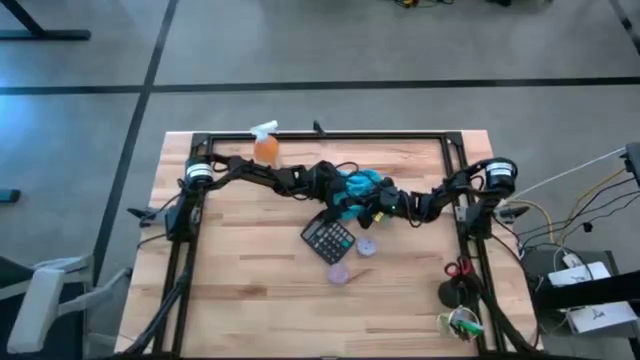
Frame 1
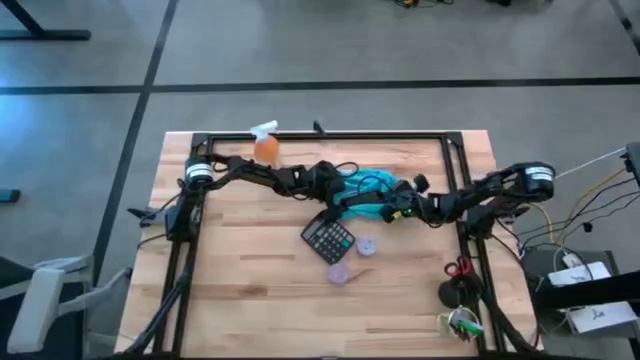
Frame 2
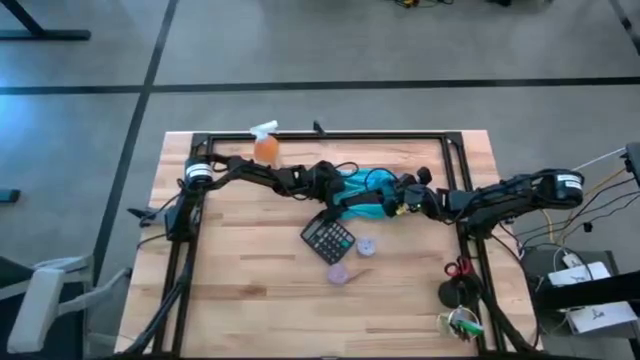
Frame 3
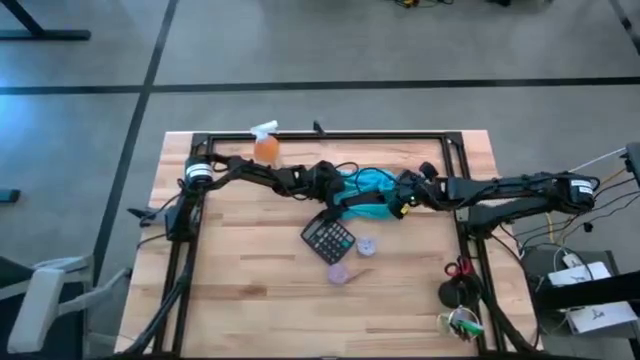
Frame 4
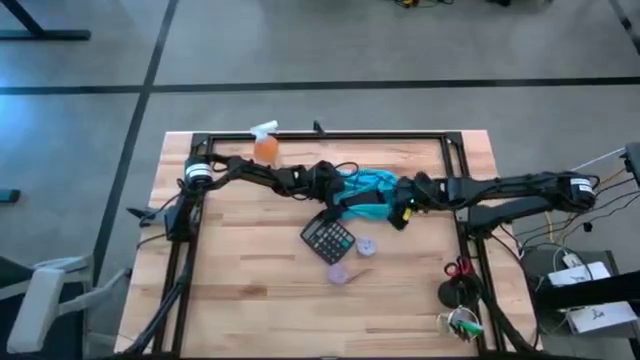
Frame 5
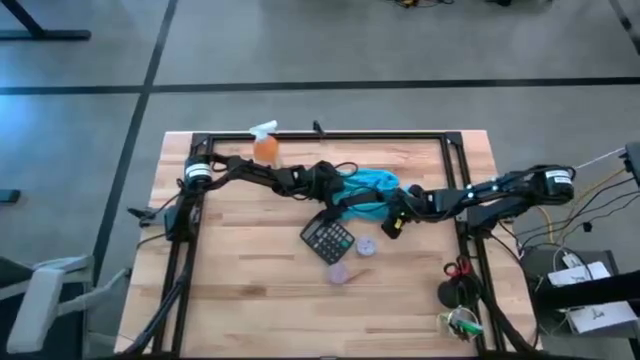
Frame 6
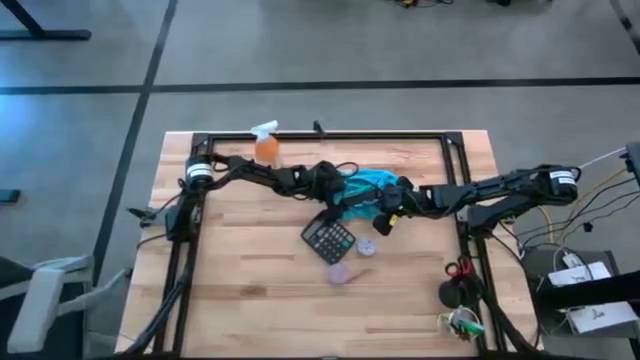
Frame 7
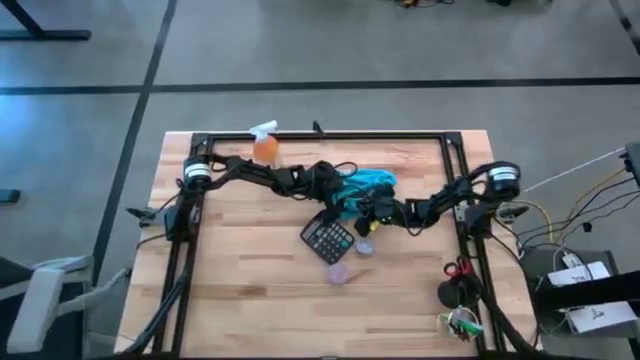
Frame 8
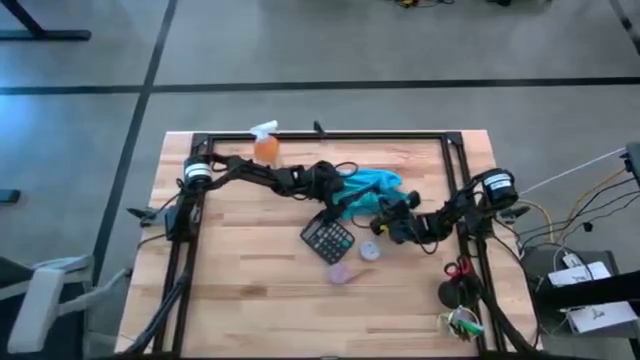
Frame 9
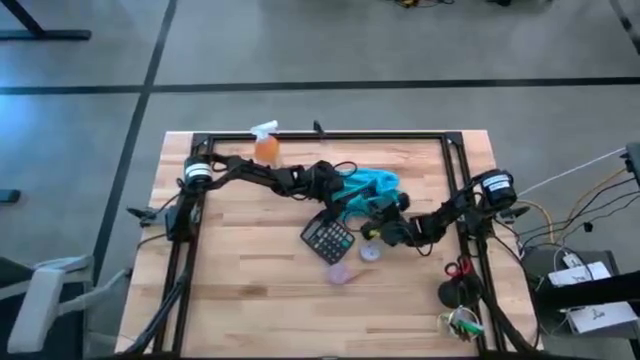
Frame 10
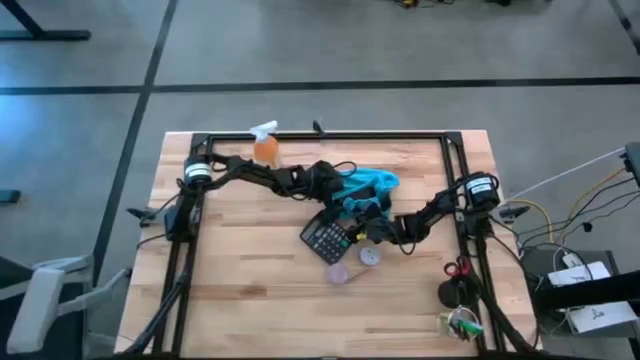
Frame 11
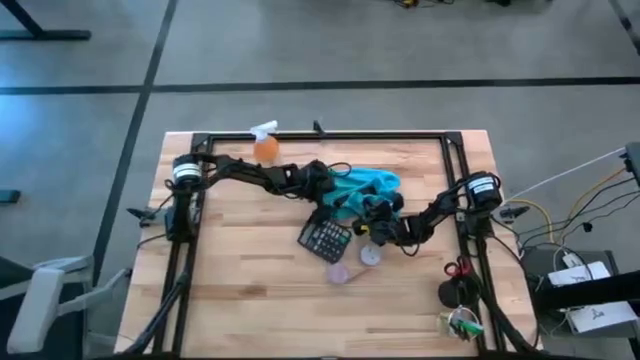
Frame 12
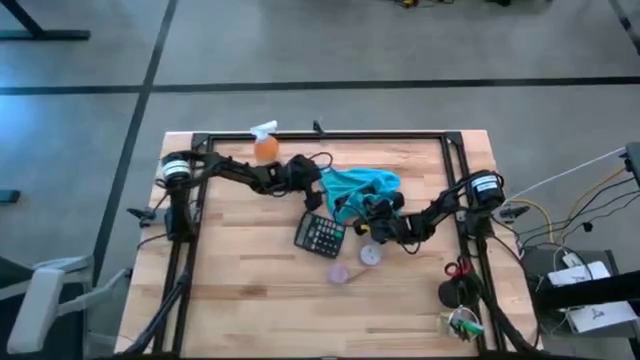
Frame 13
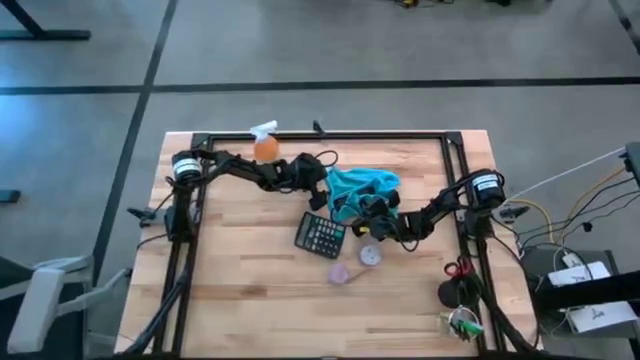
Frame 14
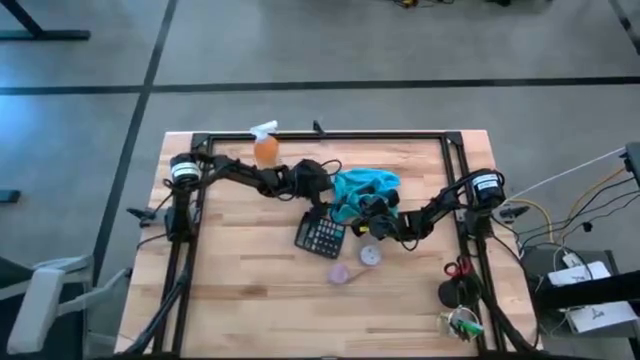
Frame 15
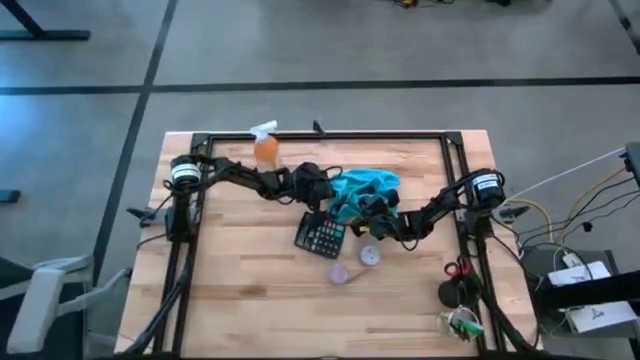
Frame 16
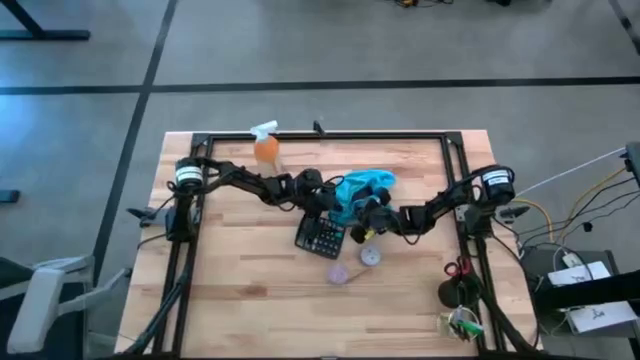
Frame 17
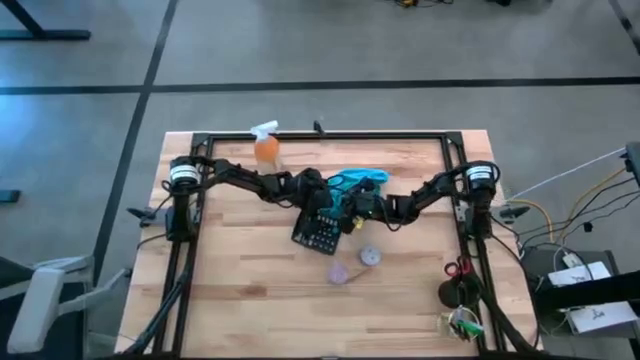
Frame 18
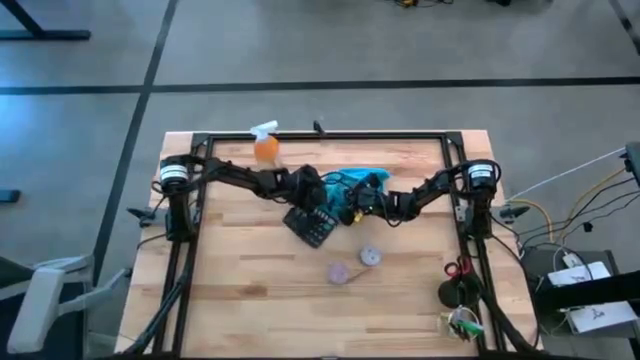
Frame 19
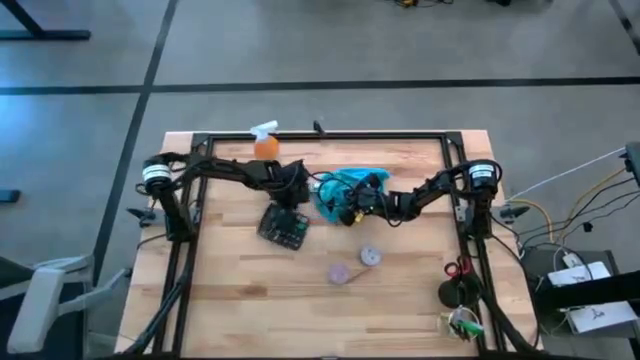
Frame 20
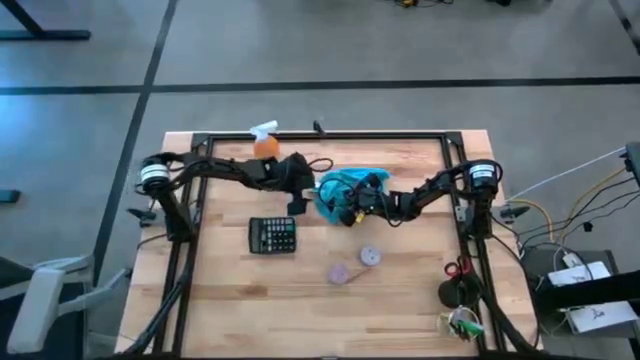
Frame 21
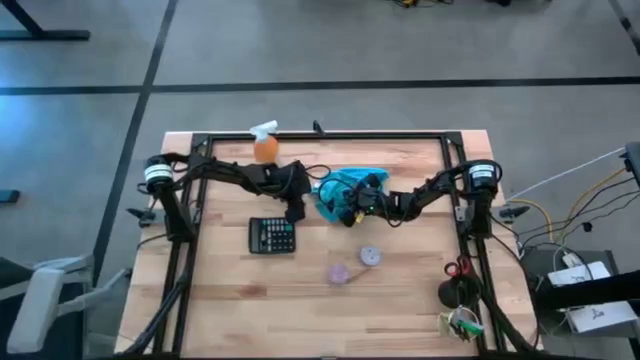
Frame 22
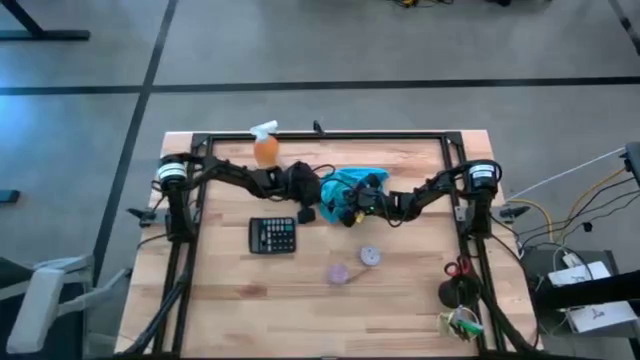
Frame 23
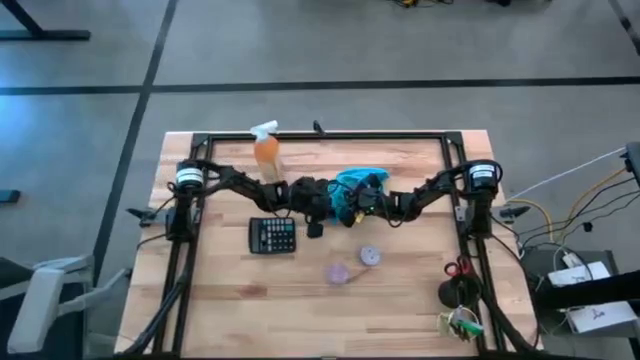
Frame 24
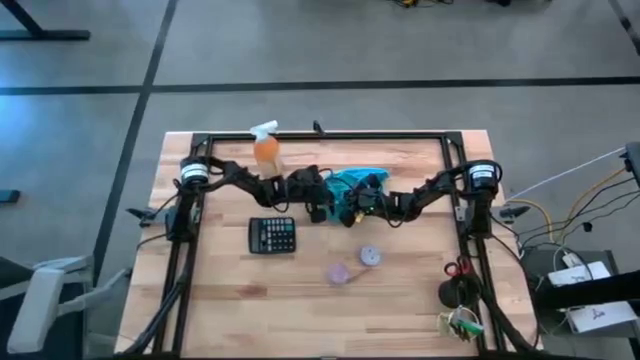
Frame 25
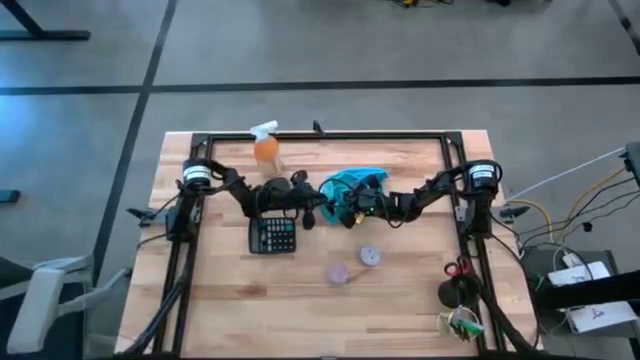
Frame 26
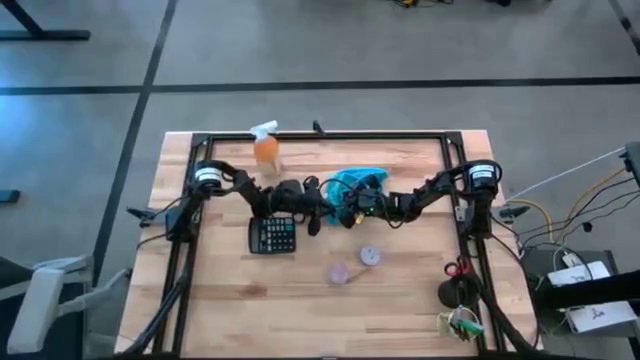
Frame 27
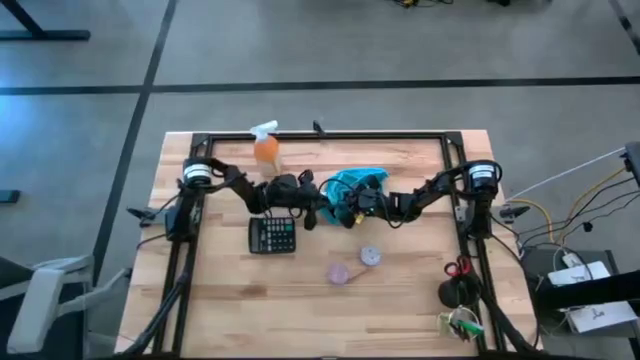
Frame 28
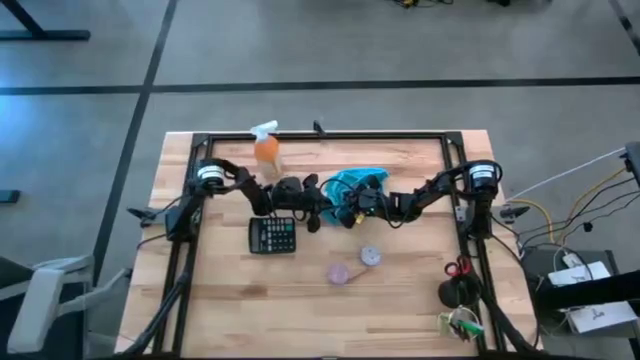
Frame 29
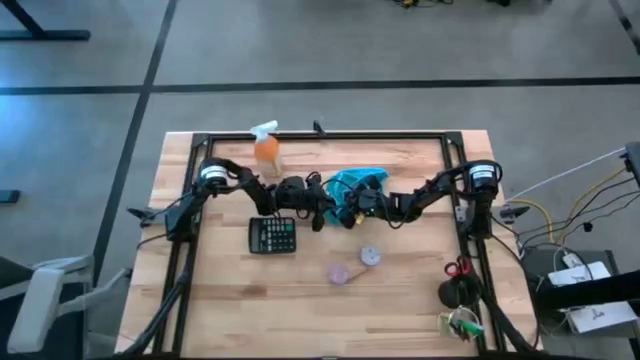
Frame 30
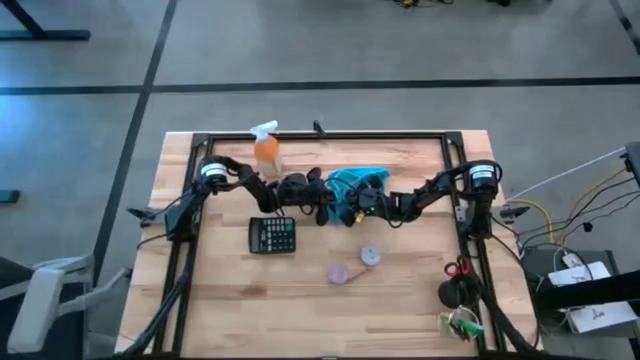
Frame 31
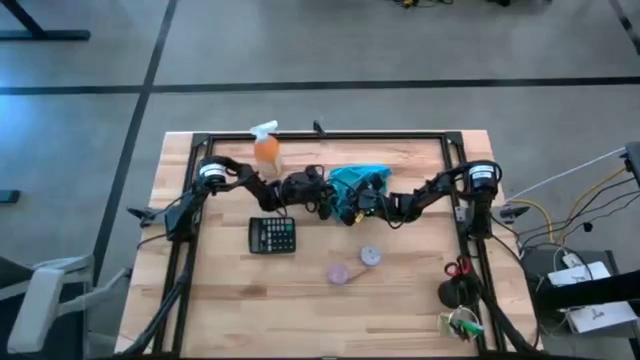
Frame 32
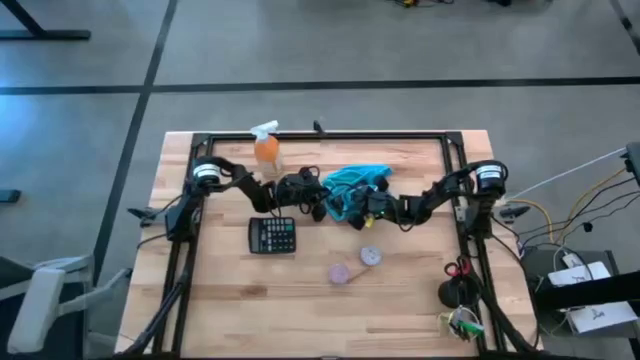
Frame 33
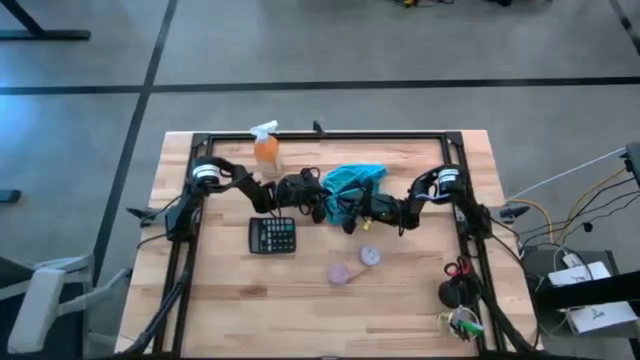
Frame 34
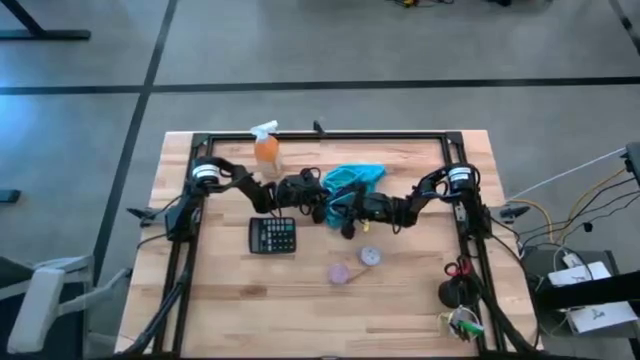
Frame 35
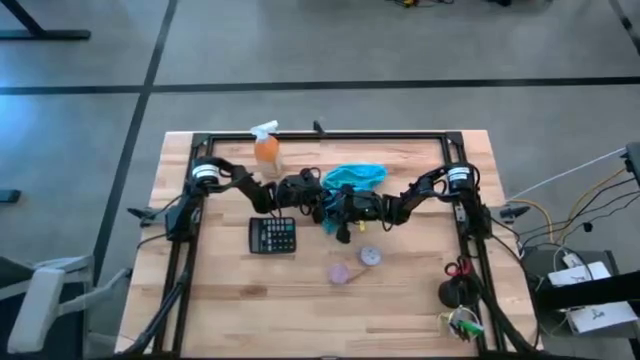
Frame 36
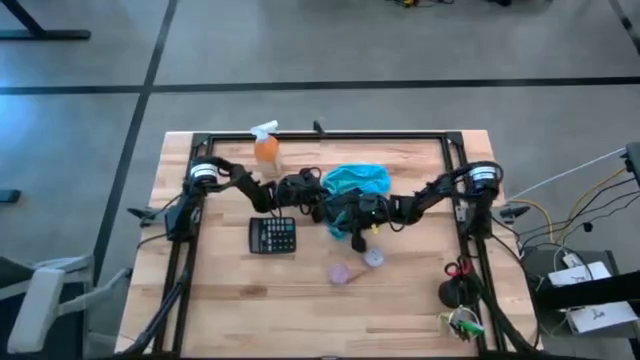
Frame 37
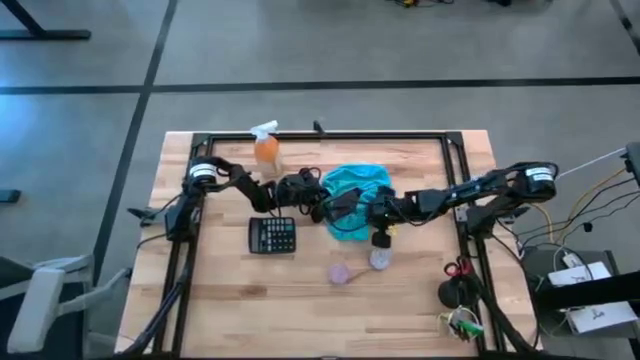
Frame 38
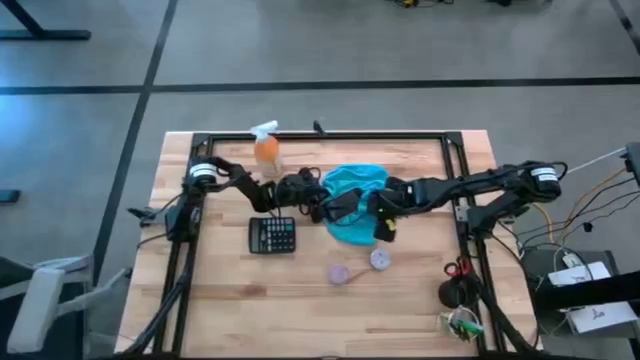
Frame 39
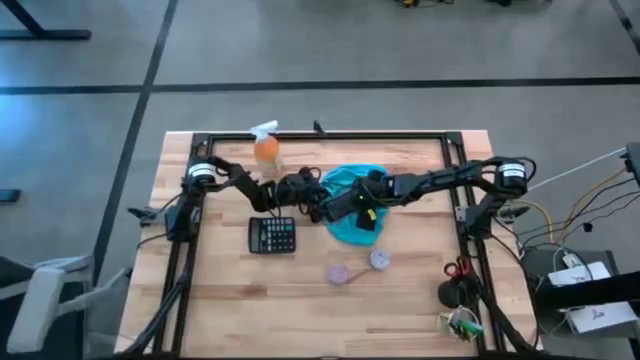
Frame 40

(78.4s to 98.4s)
Task: Apply microfiber cloth
Wipe the pink cellphone using the blue microfiber cloth

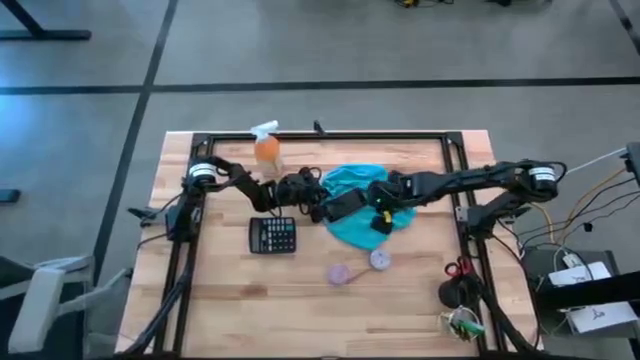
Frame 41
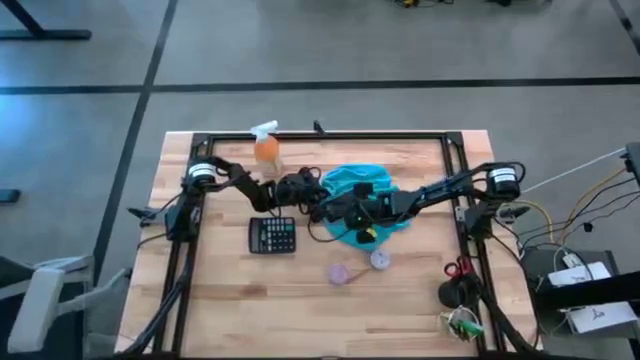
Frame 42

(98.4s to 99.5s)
Wipe the pink cellphone using the blue microfiber cloth

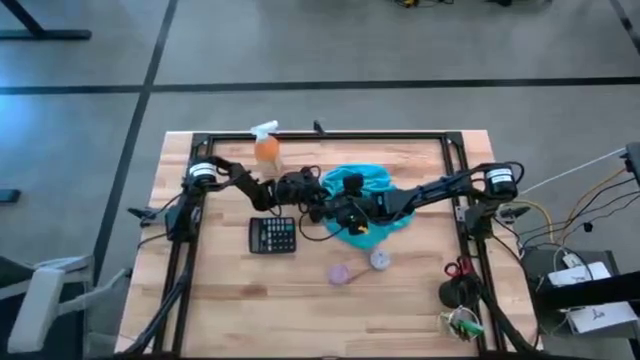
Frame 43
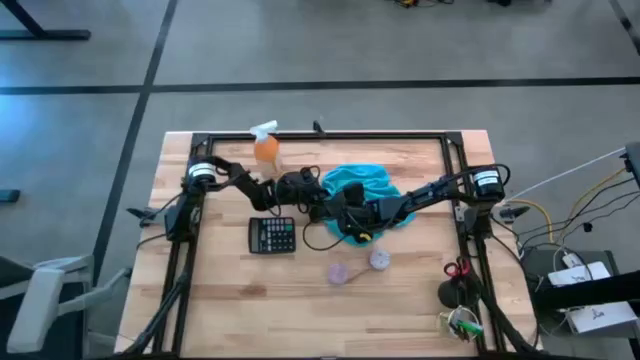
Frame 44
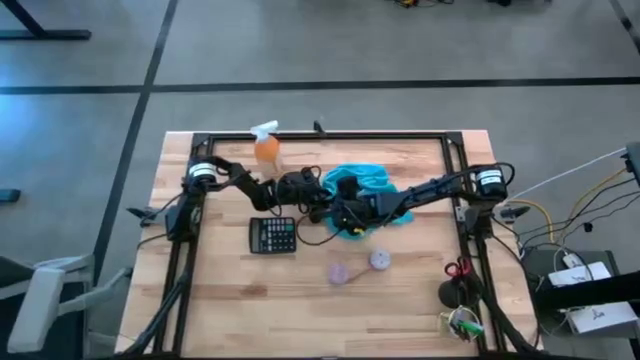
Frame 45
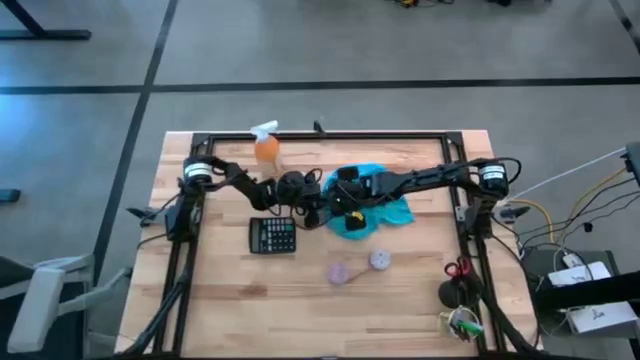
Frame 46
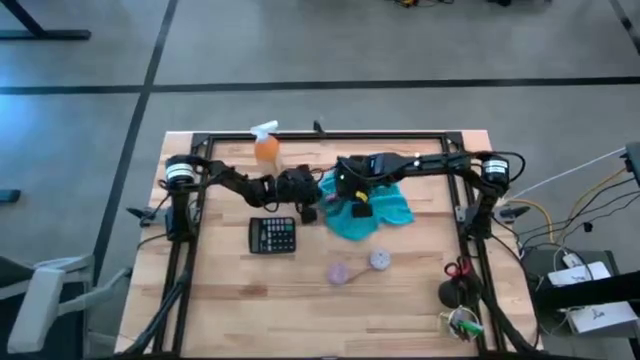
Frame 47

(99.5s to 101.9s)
Wipe the pink cellphone using the blue microfiber cloth
